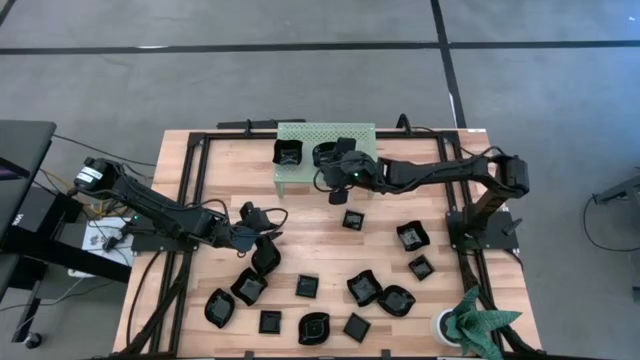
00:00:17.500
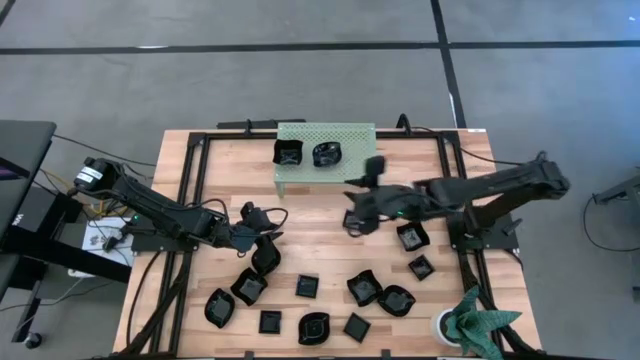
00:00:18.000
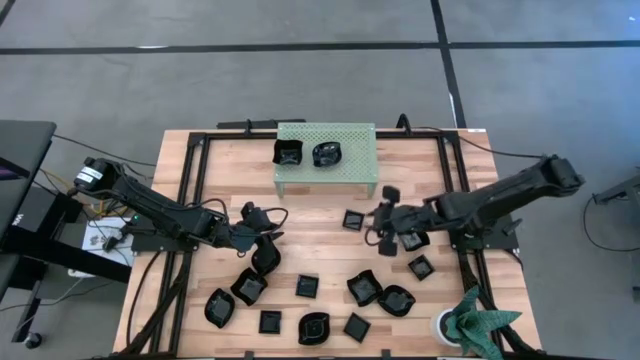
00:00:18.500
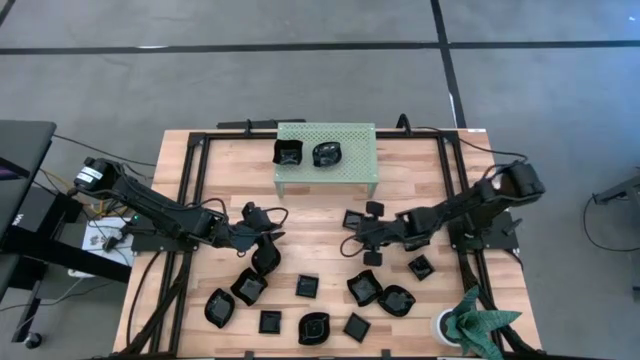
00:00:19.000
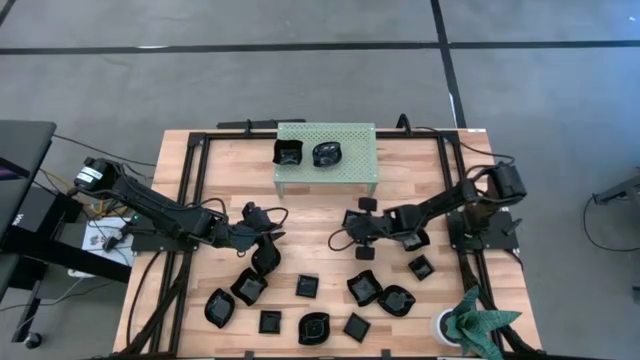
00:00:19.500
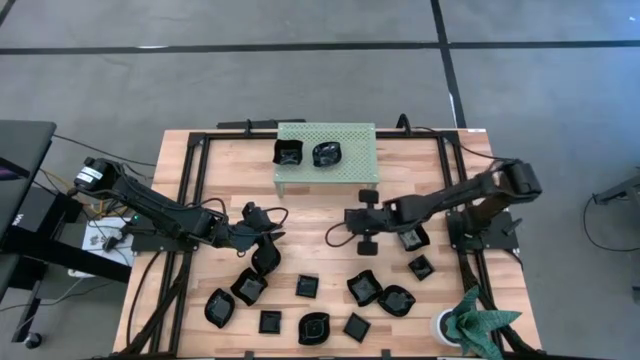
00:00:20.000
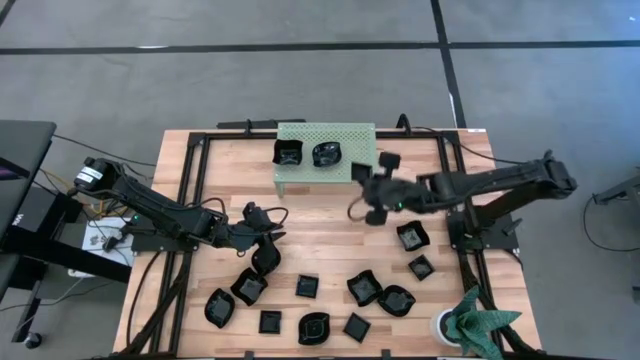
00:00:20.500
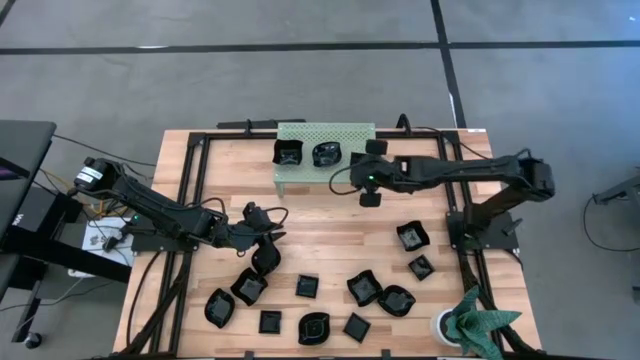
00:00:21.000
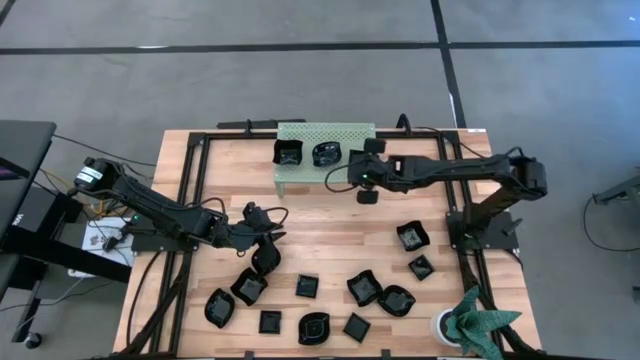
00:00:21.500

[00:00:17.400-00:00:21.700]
Task: Pick & Place Mini shaped plates
Put the square plate on the shelf

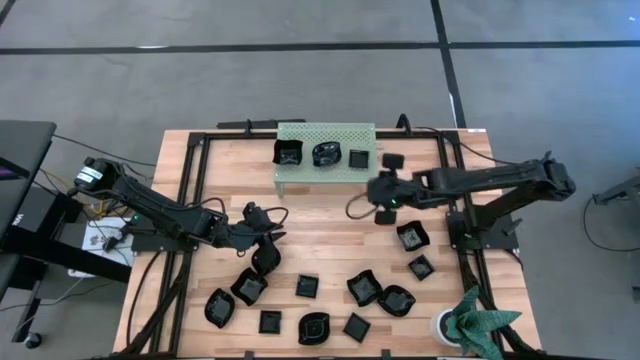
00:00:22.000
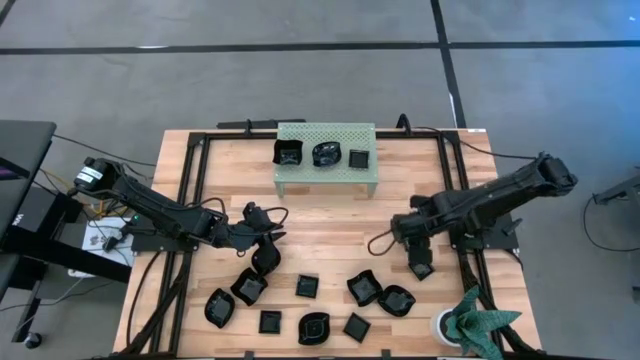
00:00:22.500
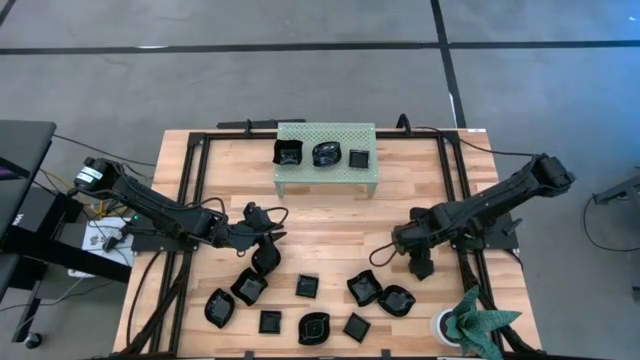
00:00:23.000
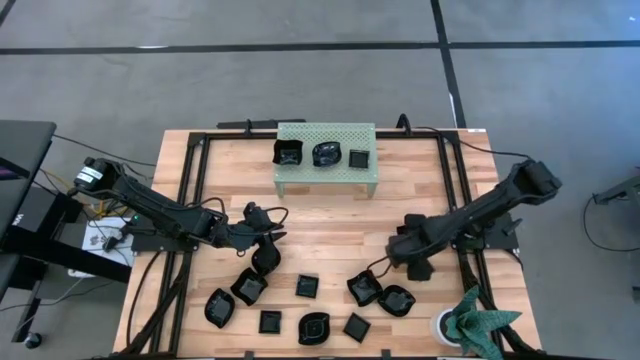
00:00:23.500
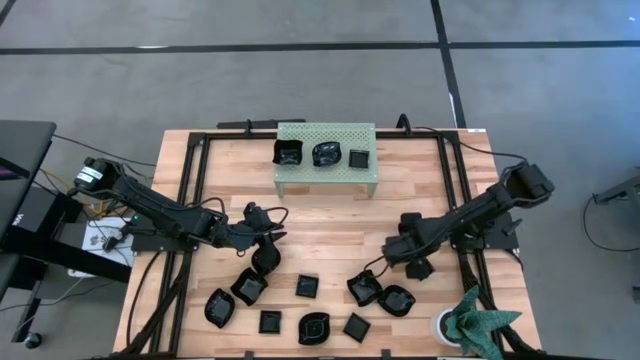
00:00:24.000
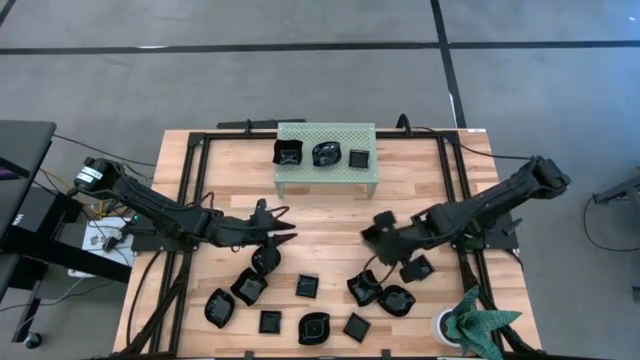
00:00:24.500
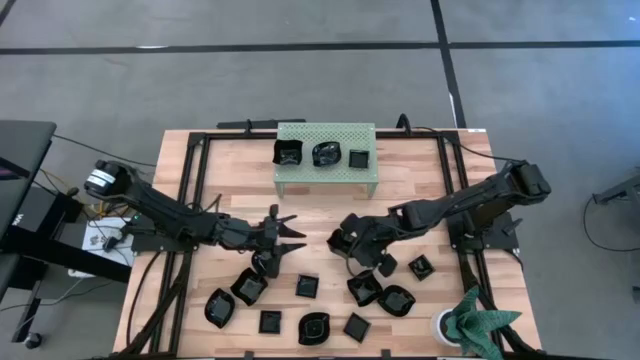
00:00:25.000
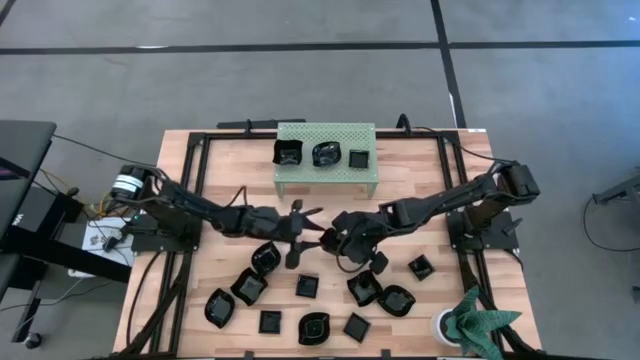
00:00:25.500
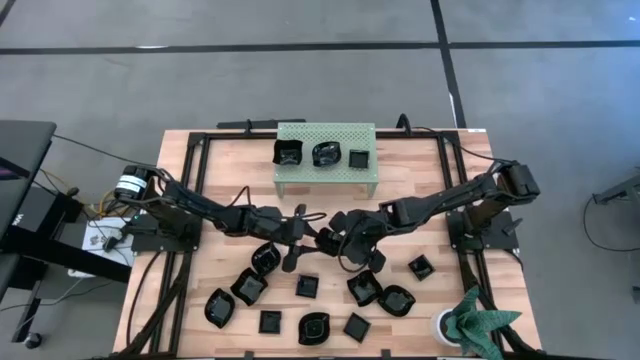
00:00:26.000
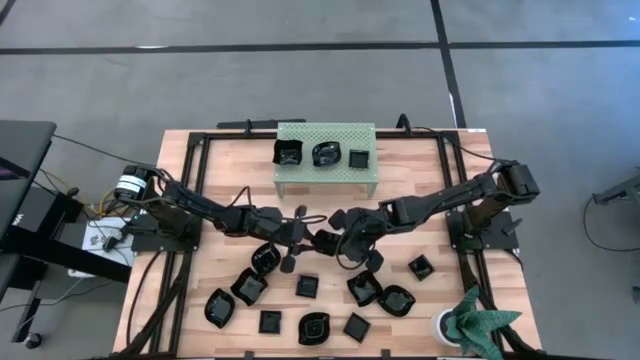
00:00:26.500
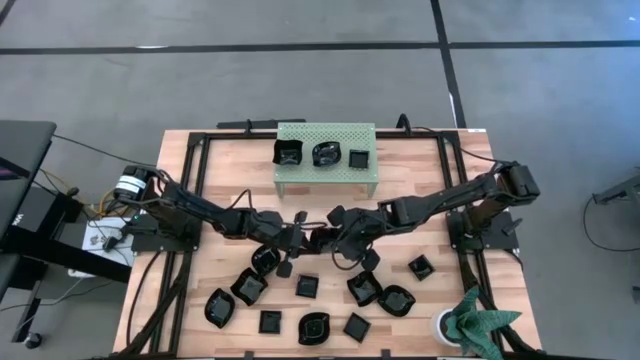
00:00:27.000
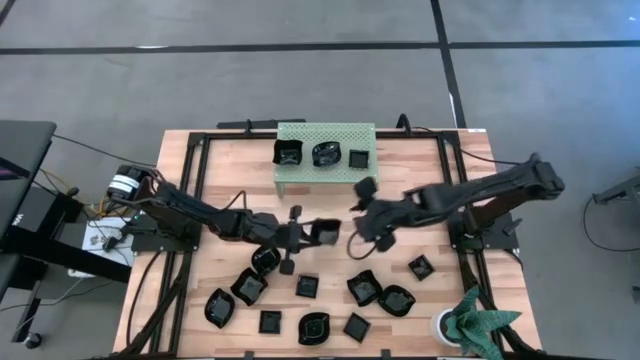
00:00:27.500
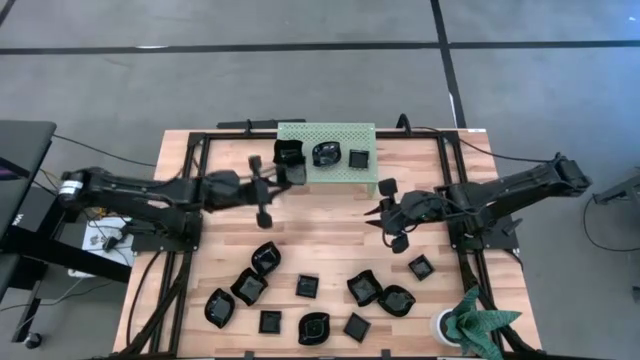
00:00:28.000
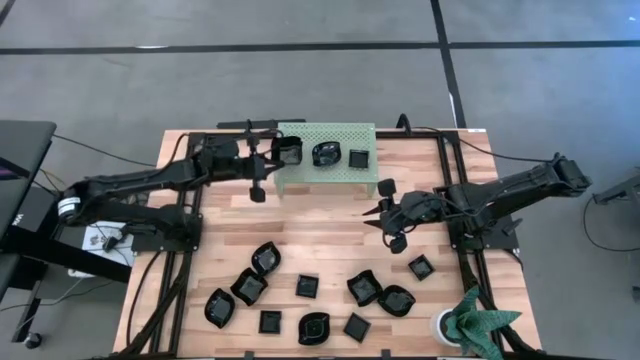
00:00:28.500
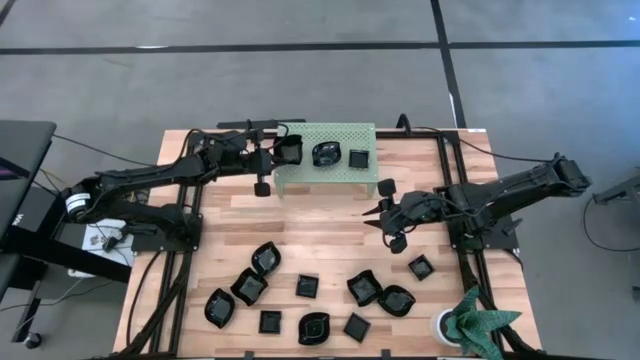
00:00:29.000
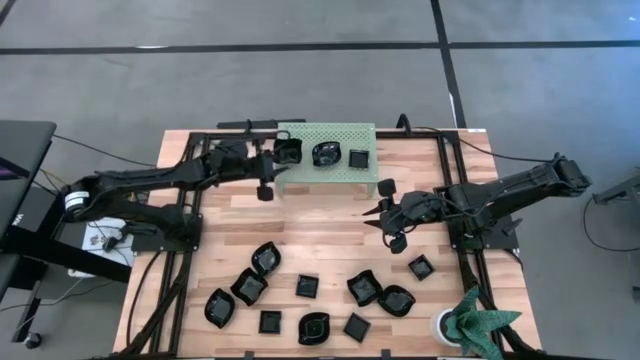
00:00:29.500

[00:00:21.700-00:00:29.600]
Stack the distorted square plate on the distorted square plate on the shelf

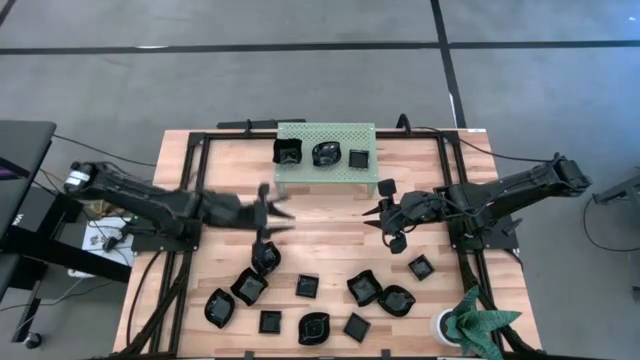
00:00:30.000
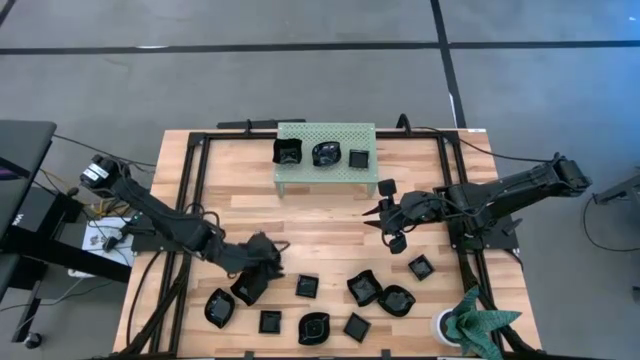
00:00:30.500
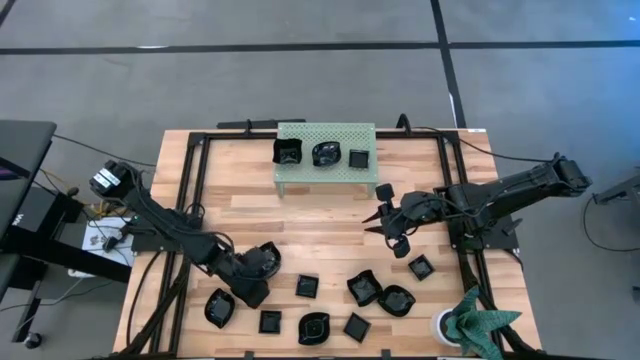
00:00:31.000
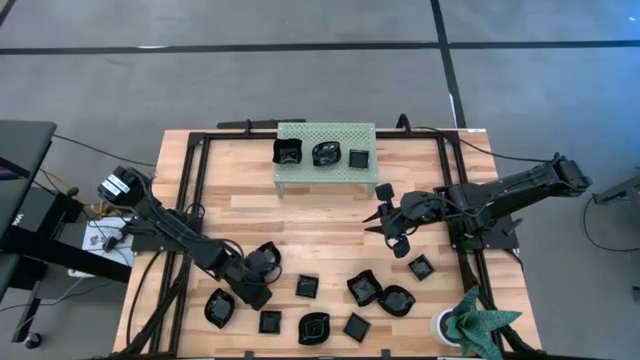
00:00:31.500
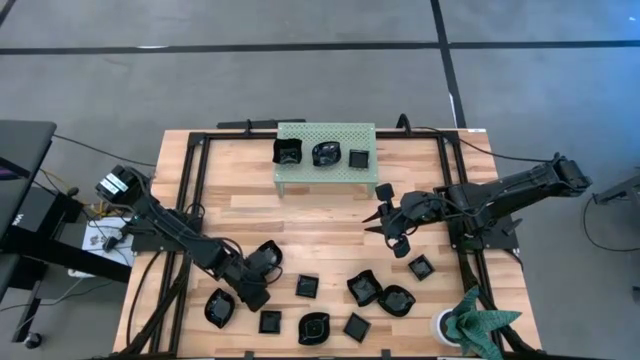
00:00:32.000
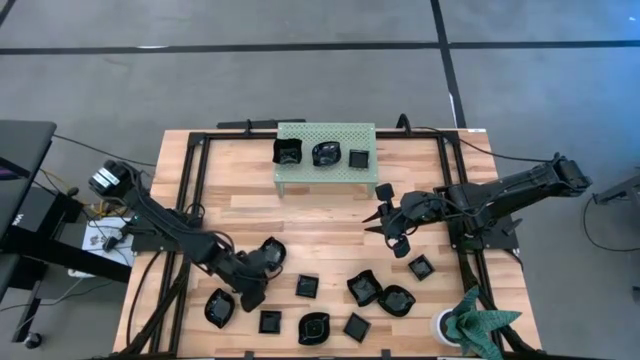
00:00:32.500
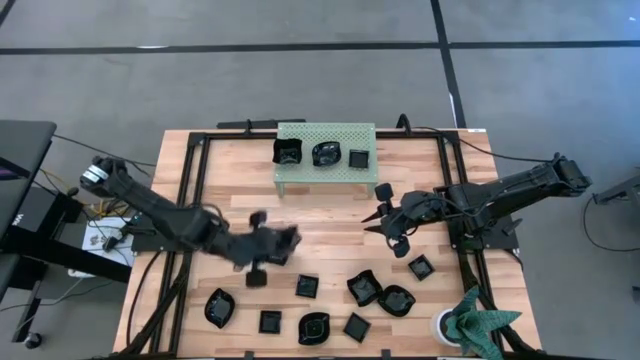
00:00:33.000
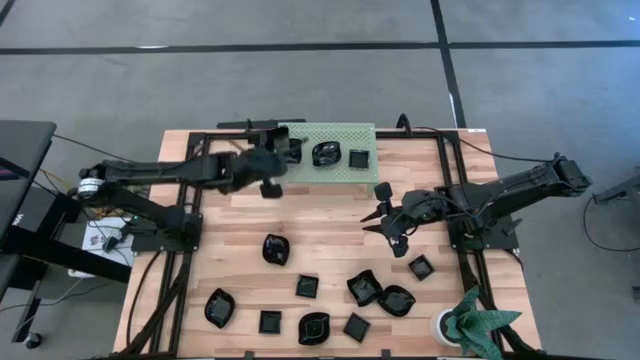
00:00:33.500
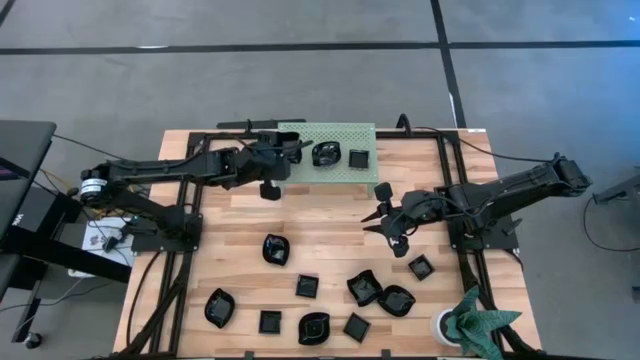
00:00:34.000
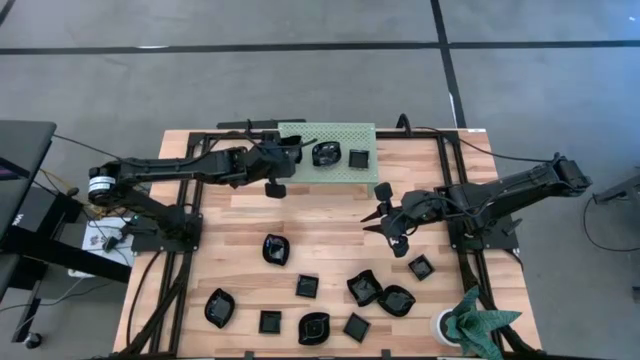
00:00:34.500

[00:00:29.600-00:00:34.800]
Stack the distorted square plate on the distorted square plate on the shelf

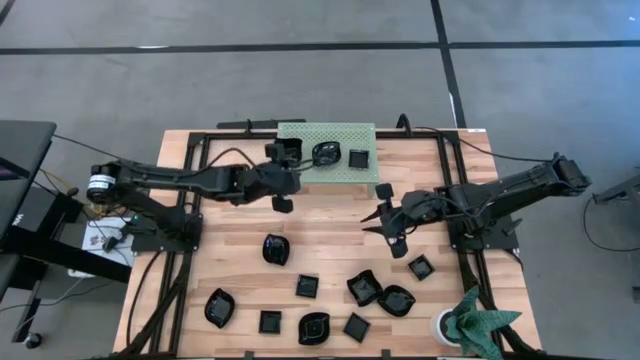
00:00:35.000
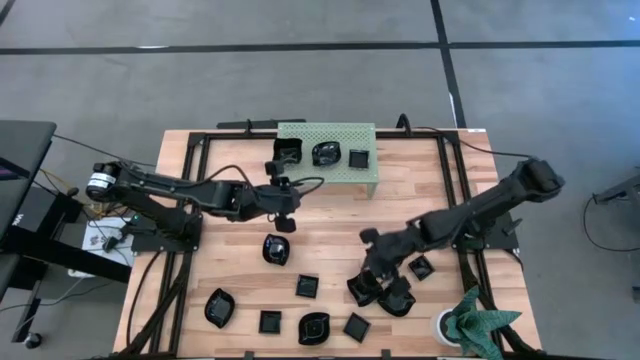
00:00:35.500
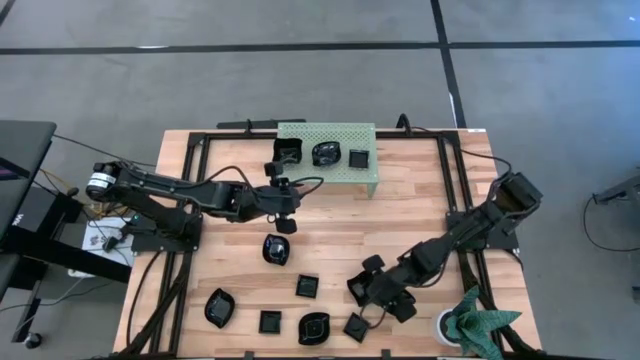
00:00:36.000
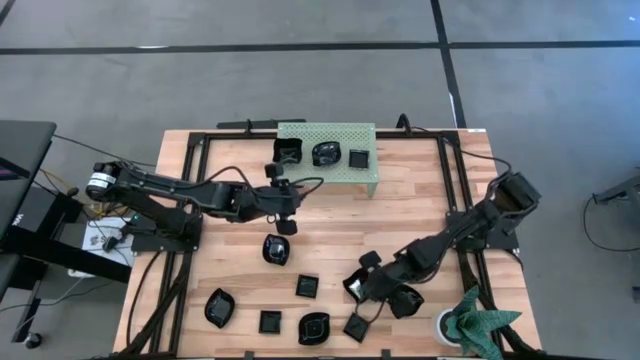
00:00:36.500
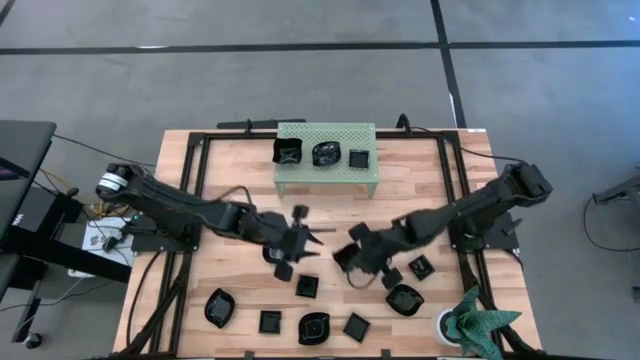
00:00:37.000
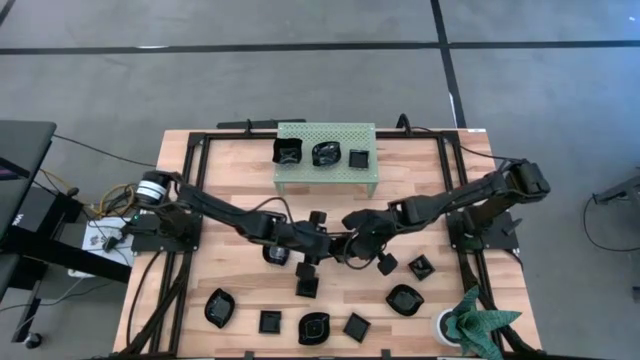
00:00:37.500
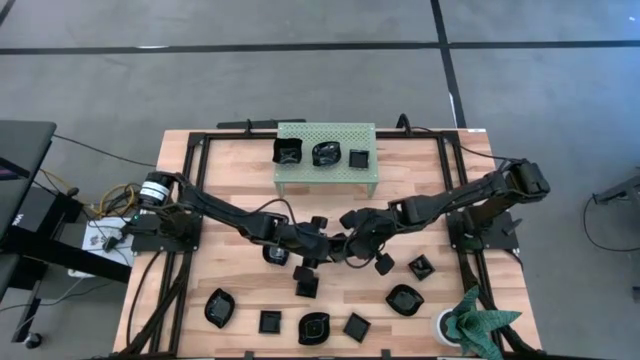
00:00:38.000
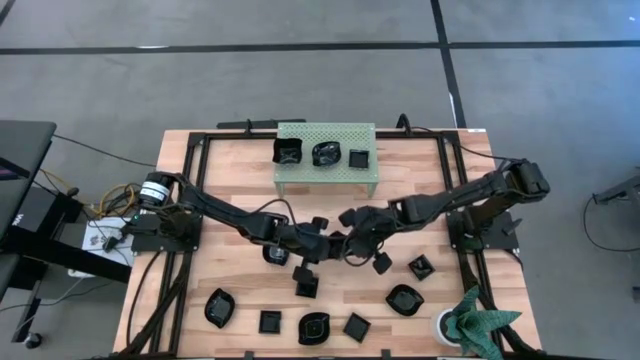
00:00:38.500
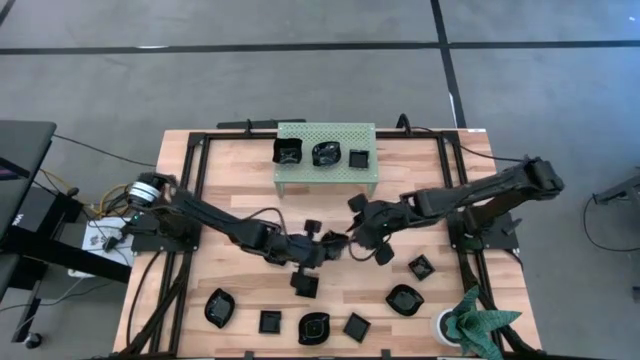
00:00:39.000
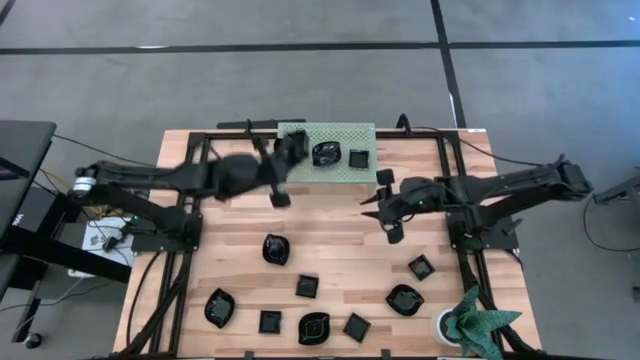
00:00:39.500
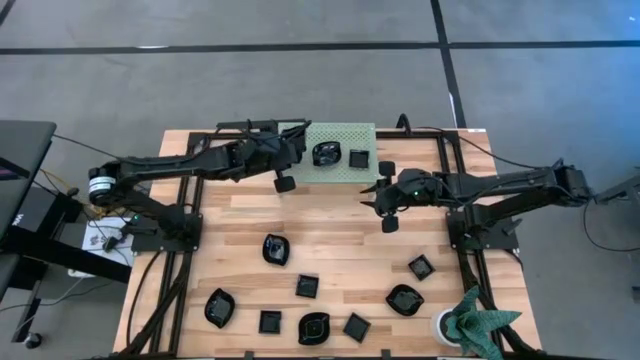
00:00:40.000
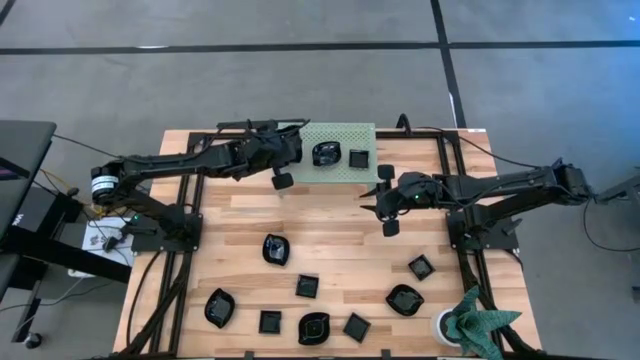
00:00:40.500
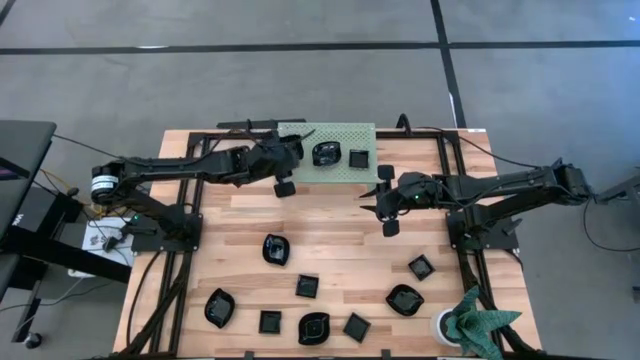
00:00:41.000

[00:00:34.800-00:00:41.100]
Stack the distorted square plate on the distorted square plate on the shelf
